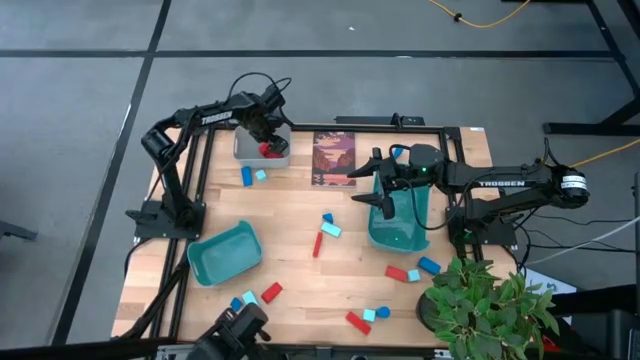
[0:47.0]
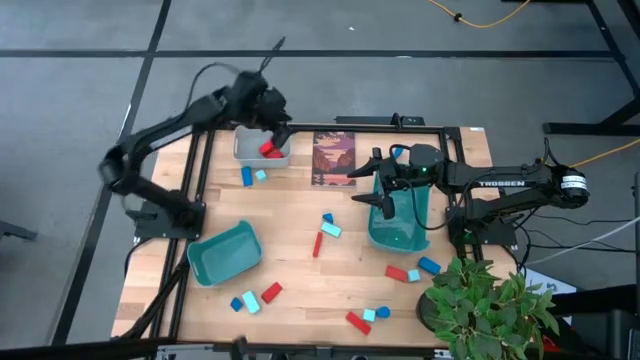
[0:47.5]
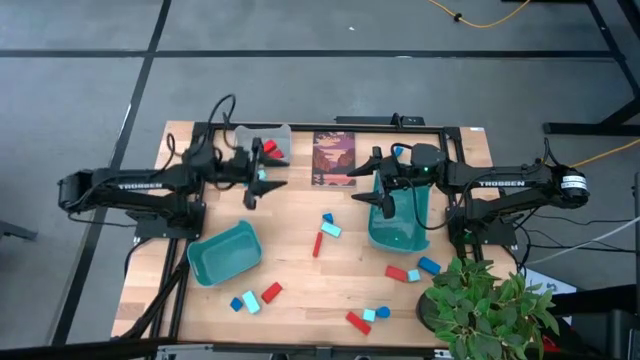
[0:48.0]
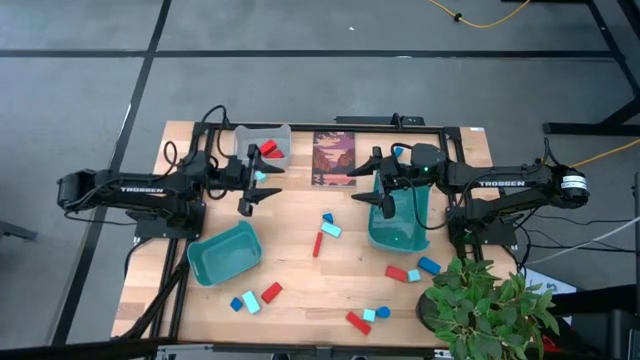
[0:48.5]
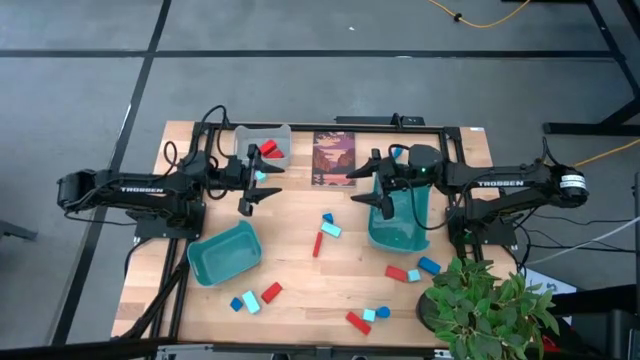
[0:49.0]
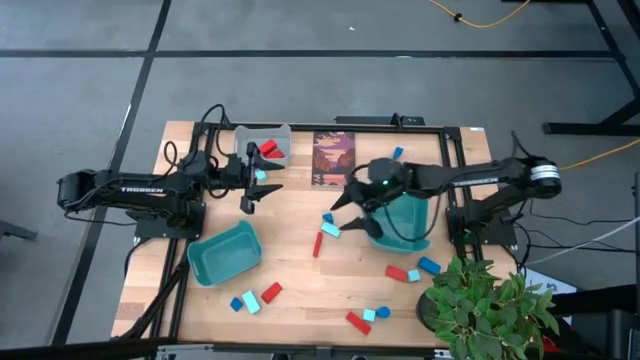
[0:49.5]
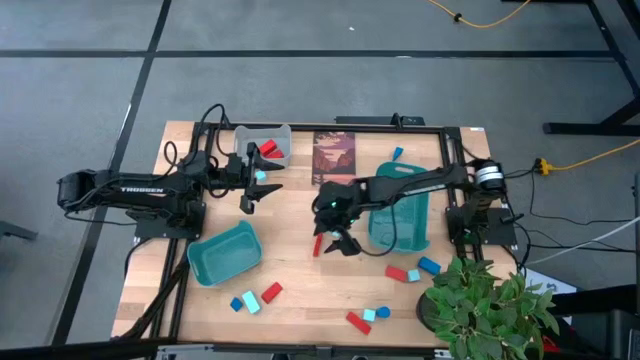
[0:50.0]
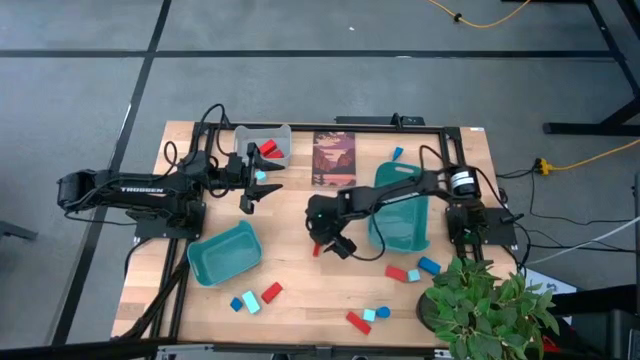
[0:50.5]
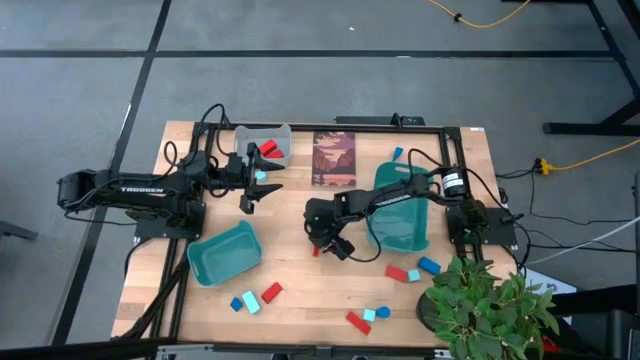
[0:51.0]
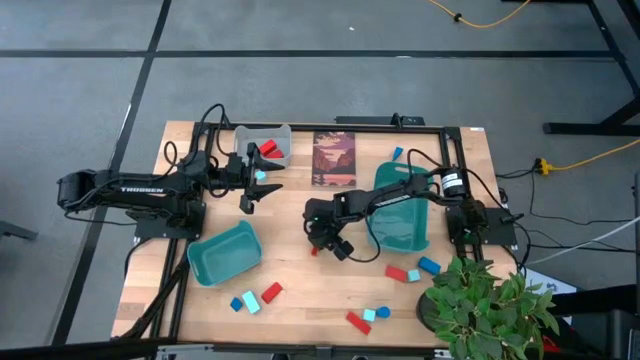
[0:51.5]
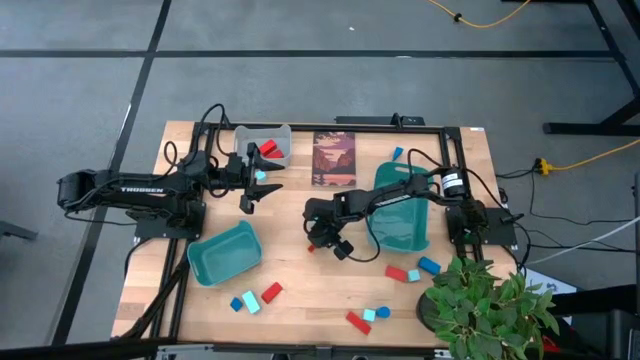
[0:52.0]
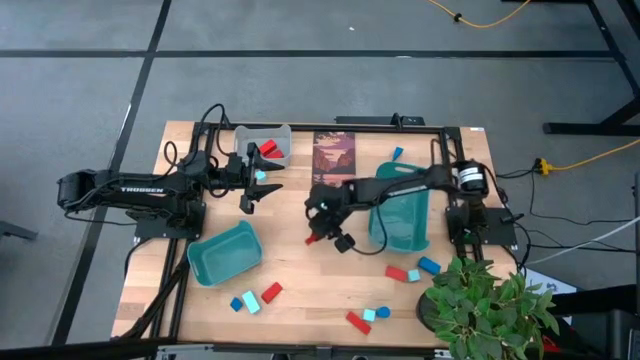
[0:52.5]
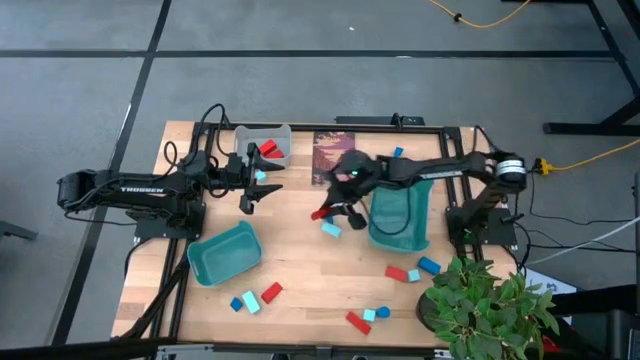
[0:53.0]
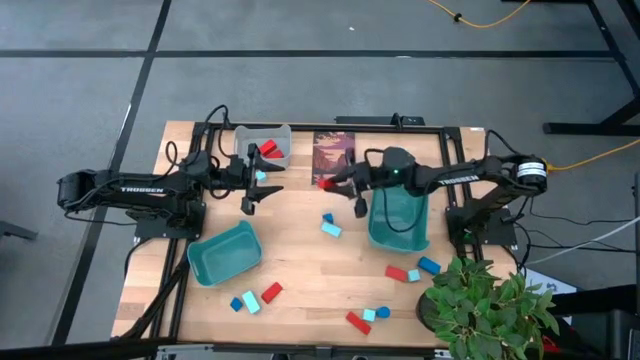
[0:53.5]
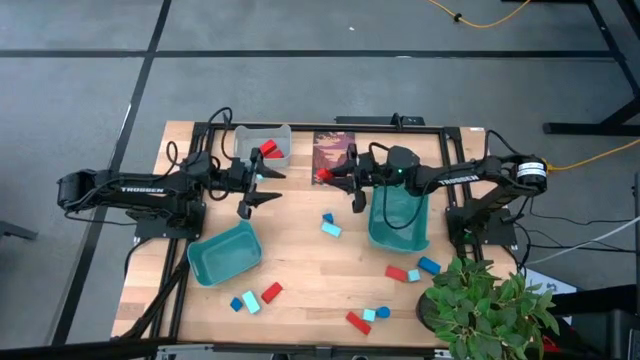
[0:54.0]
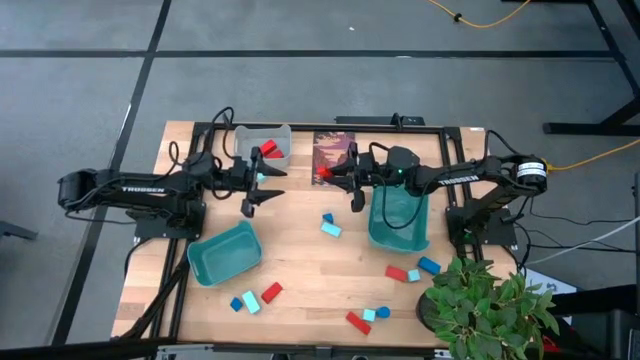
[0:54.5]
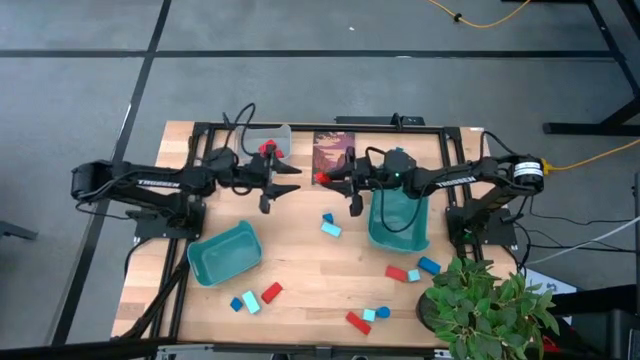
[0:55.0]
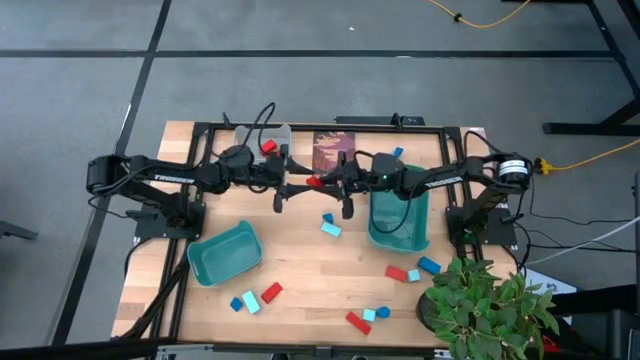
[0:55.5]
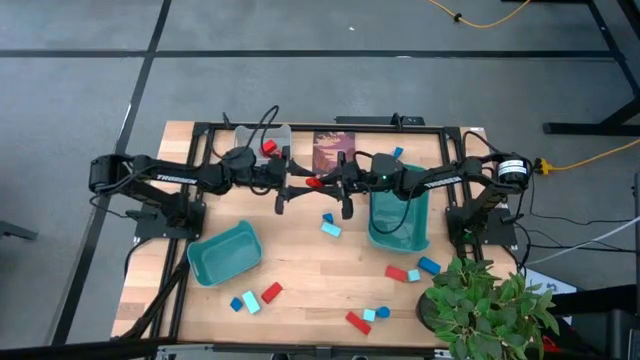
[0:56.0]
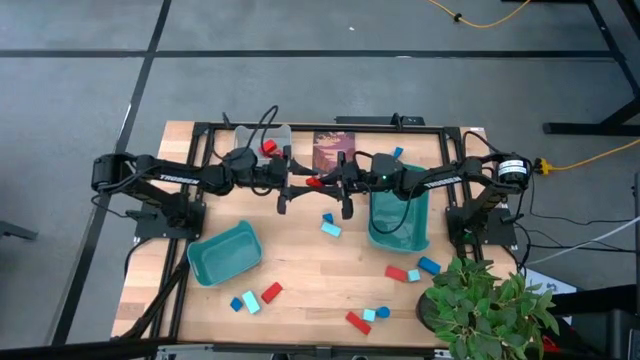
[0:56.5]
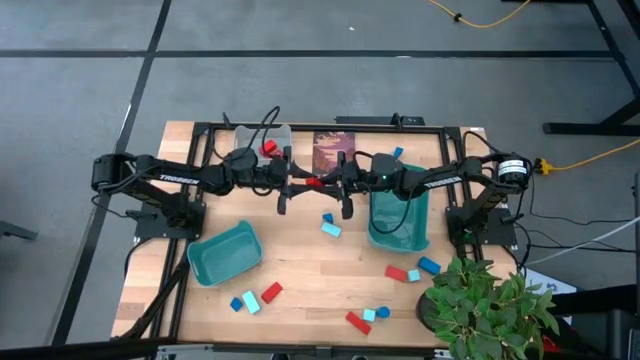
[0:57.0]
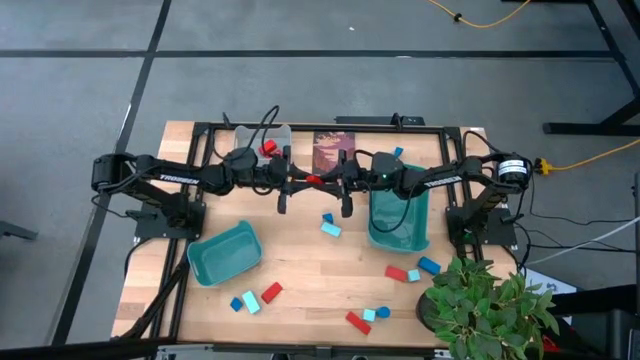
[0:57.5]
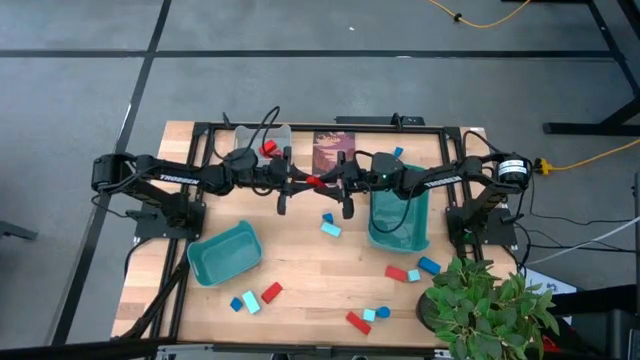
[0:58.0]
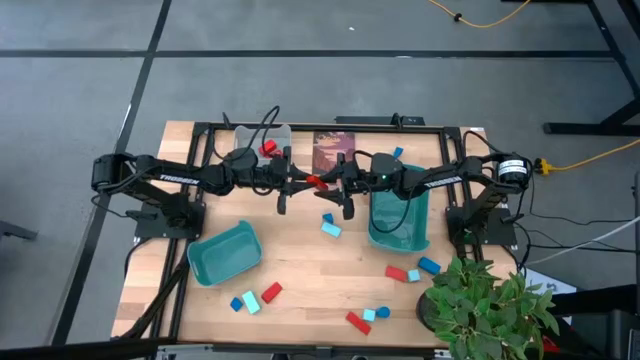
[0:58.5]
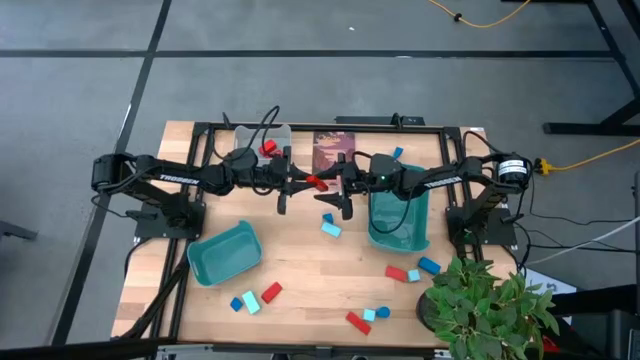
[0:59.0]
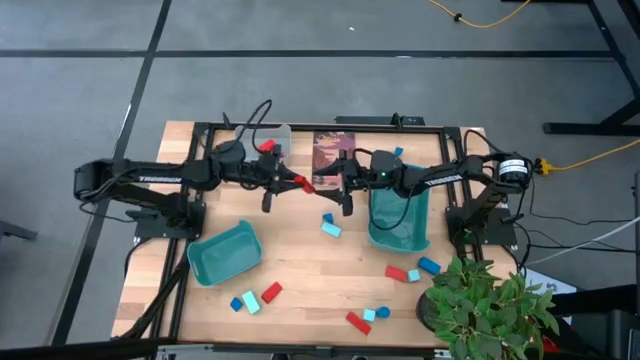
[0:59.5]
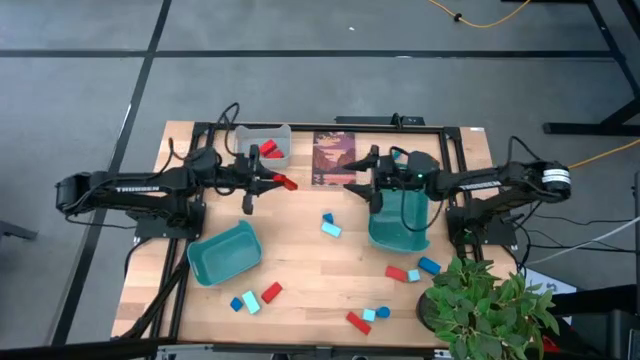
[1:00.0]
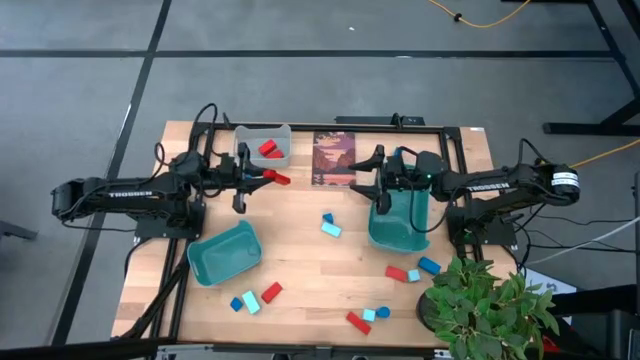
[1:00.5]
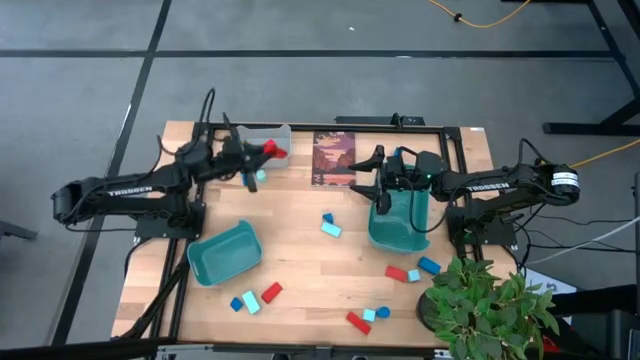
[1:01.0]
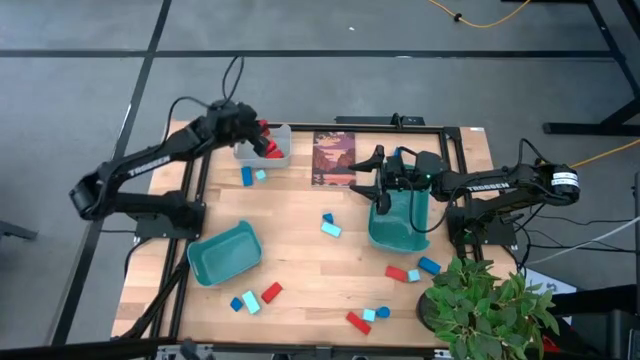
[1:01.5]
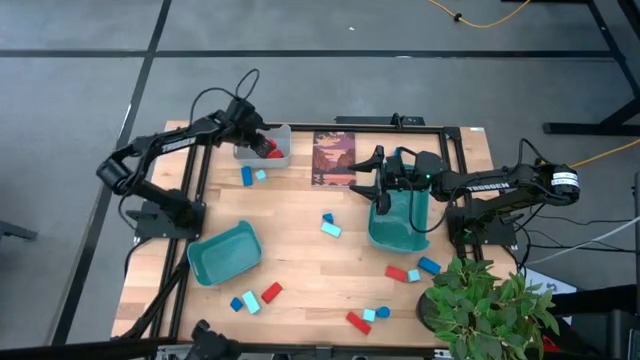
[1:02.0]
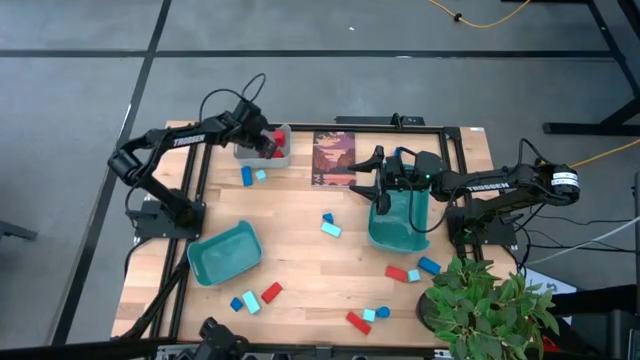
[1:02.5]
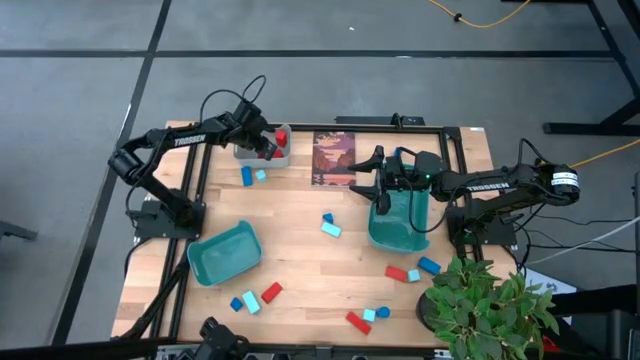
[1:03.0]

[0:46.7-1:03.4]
Task: Sort & place blocks by color
Put the red block into the gray bin
